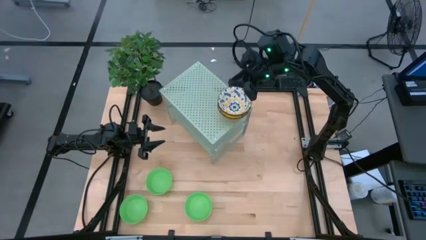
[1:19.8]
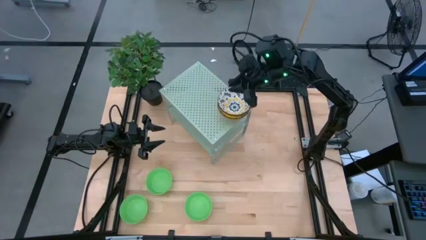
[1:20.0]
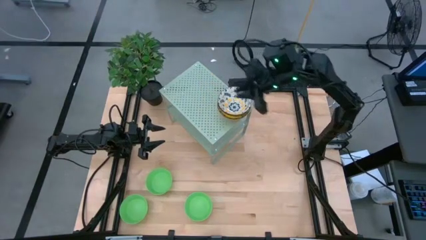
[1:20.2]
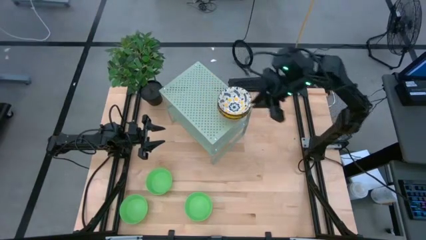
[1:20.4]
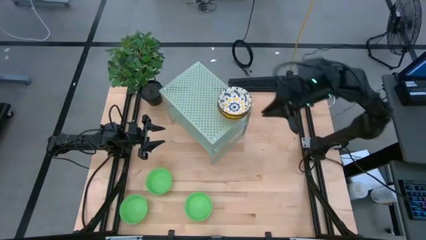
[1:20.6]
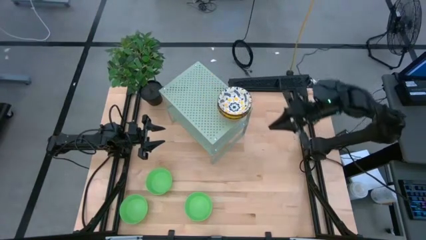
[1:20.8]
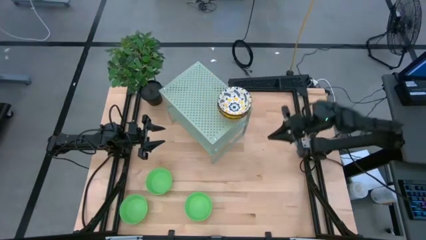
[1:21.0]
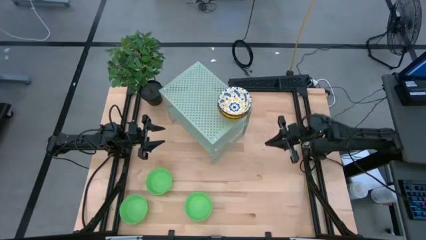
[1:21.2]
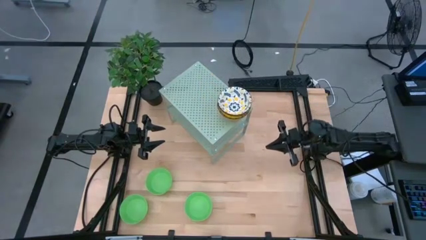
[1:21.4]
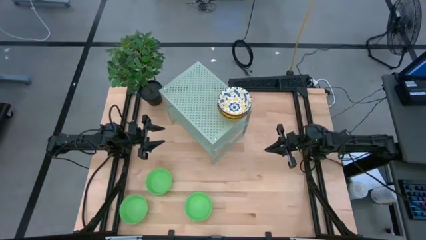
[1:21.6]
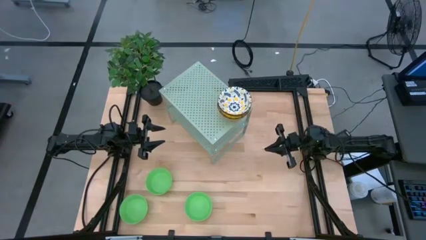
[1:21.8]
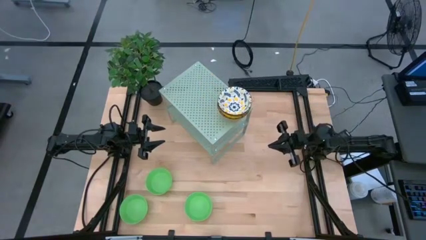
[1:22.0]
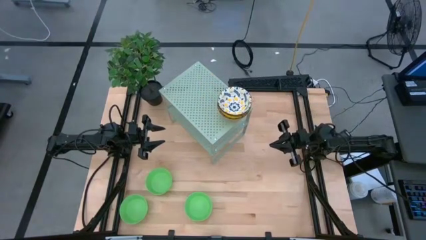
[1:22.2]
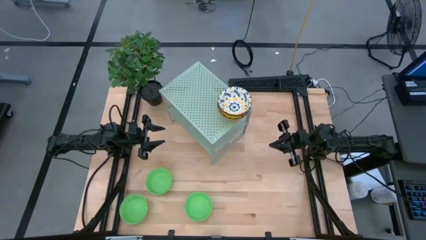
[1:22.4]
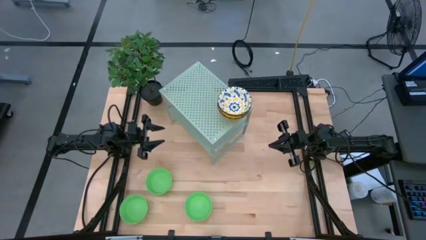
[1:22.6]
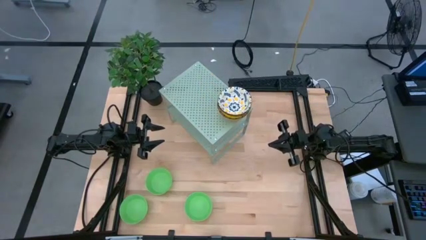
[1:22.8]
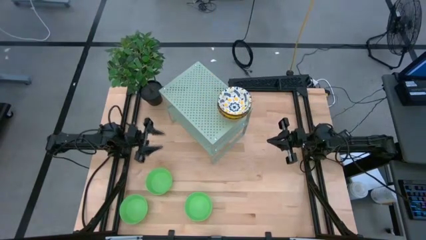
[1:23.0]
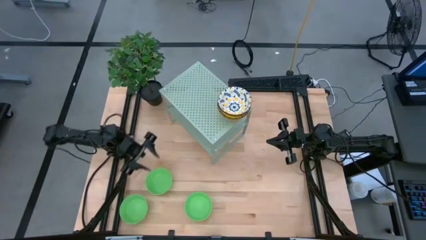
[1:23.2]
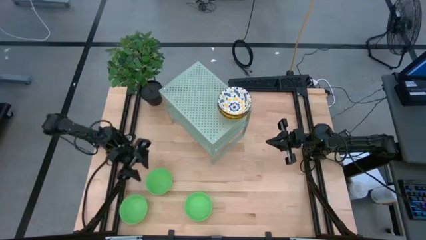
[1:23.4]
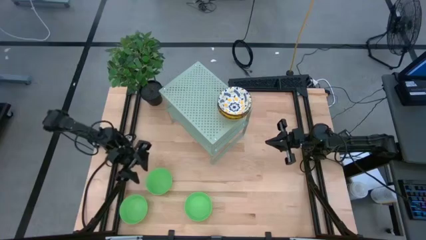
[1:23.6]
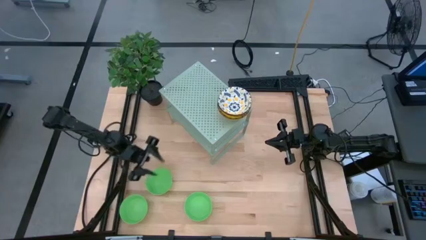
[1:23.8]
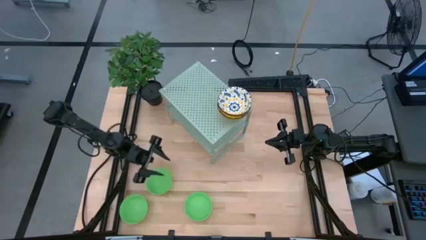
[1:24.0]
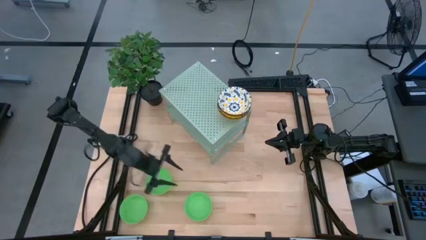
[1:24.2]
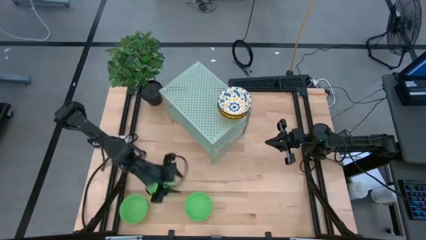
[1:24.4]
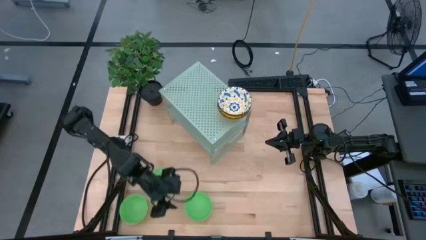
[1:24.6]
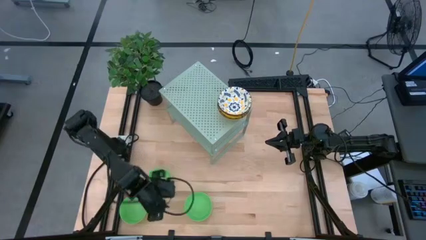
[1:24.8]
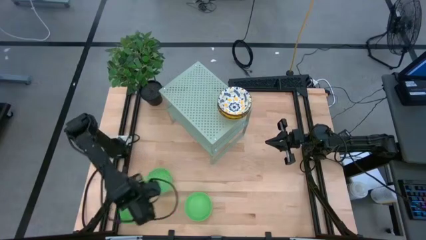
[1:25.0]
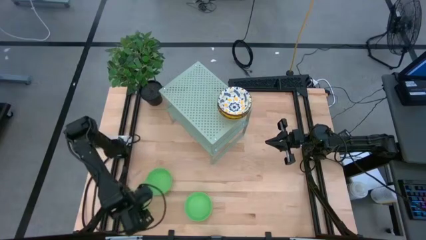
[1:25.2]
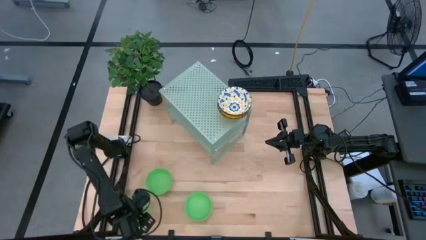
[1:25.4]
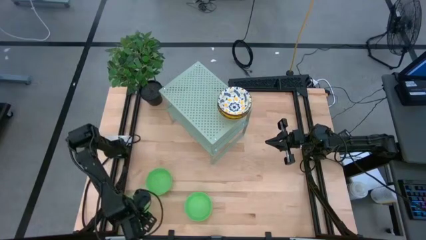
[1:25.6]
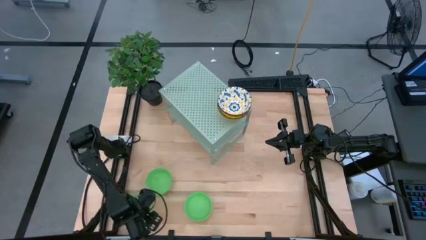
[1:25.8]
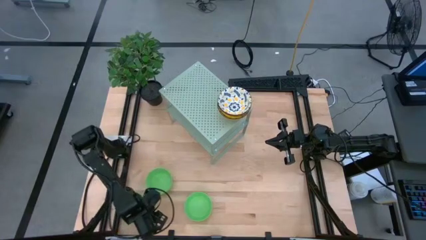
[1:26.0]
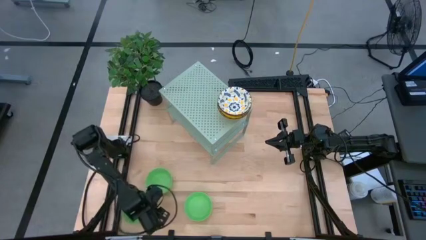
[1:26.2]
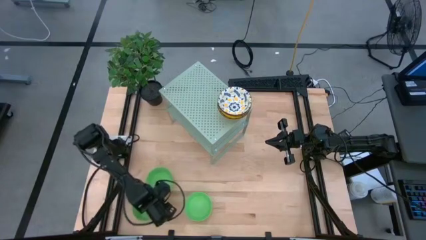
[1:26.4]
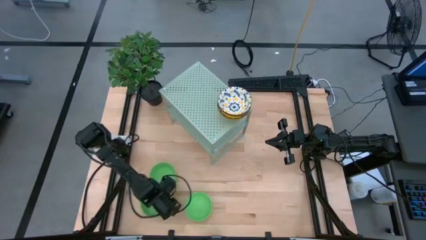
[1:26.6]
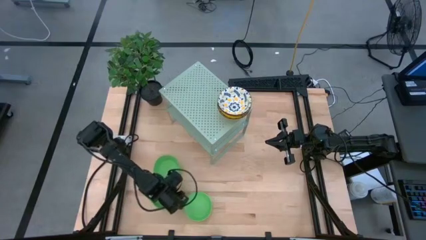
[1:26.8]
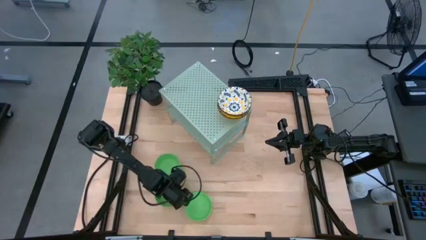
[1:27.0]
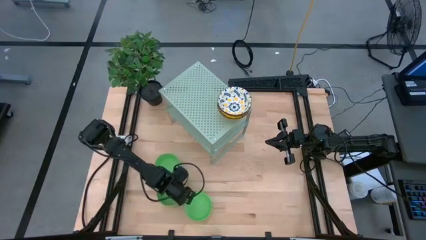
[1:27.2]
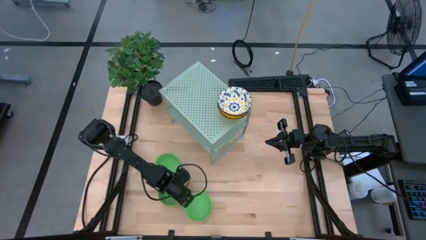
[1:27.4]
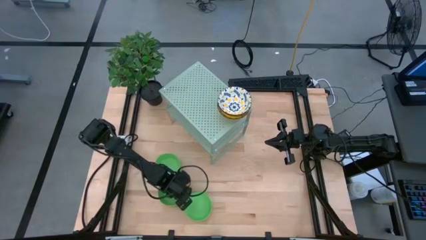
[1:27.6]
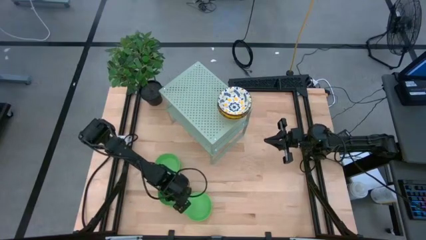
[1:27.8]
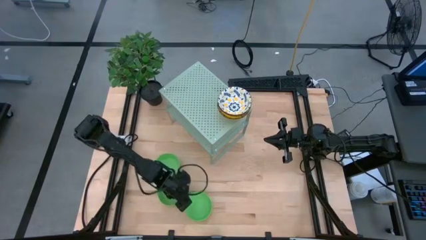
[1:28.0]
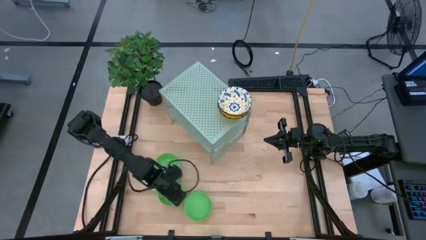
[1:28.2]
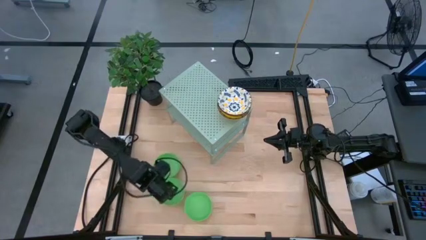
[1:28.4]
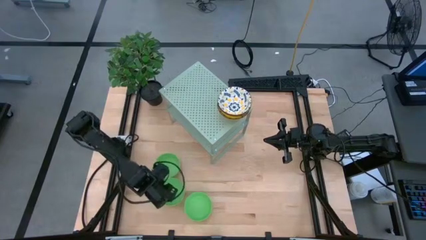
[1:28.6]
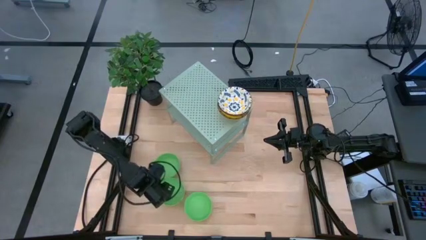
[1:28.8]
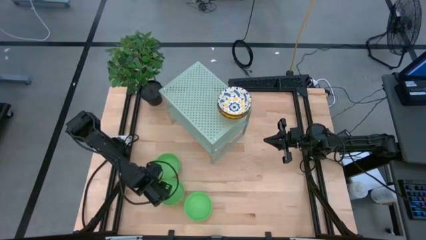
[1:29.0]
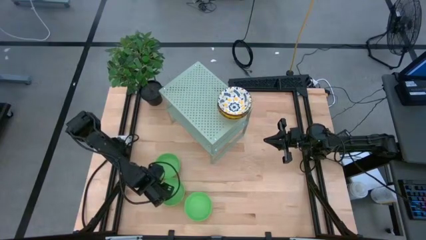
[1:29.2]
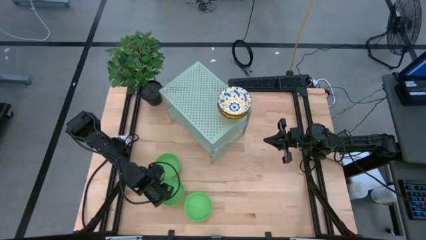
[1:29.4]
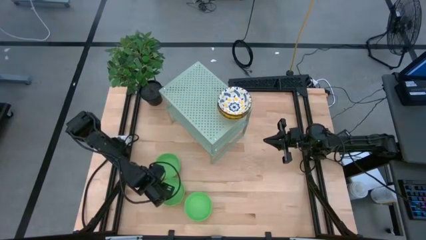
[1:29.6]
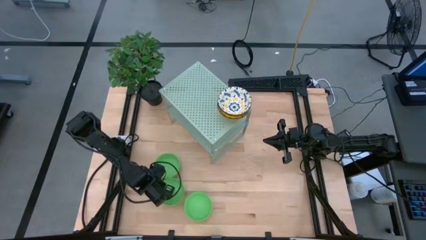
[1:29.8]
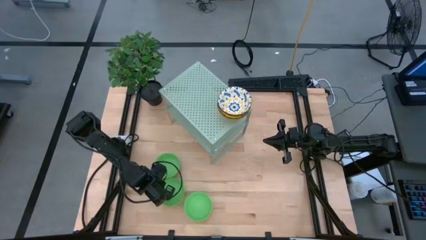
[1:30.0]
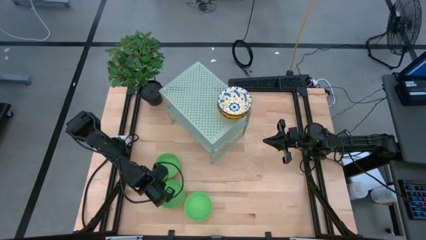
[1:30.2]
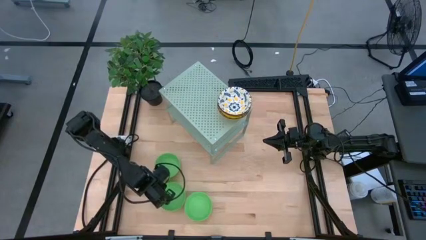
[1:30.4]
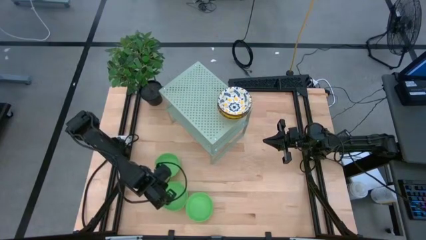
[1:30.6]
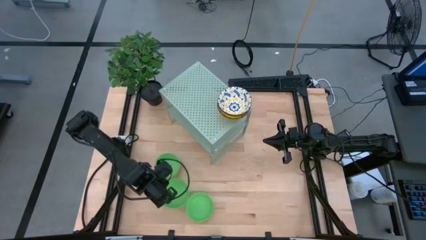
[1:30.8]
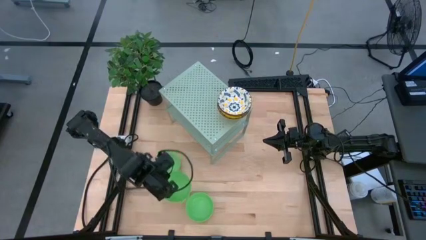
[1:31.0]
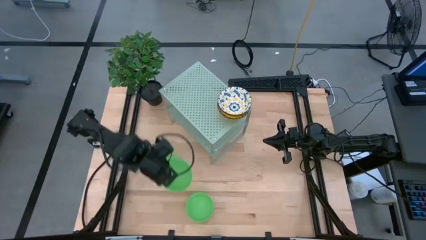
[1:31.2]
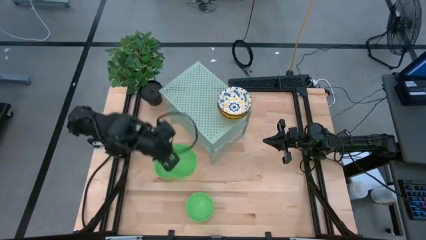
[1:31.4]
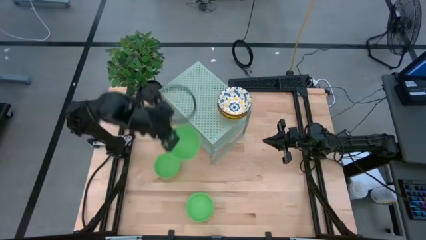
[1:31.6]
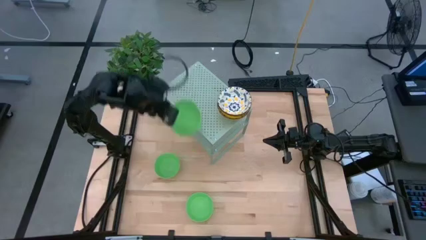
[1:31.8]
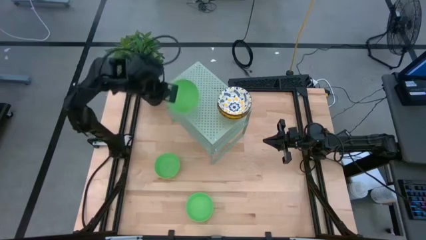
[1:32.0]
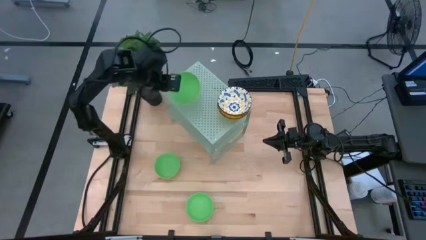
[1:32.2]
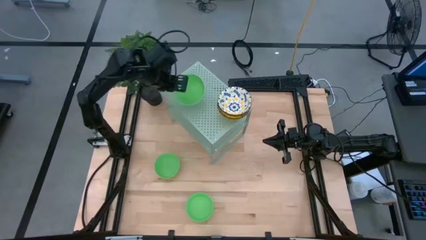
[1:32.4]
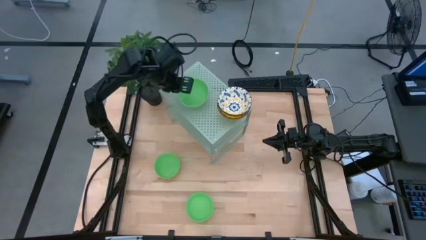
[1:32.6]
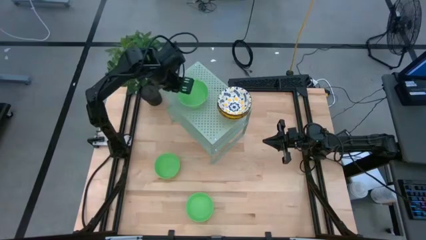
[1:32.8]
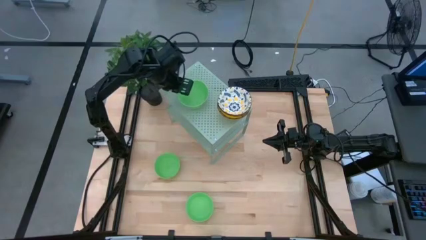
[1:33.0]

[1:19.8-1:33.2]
Task: Pick & Place Mini bowls
Put the bottom left green bowl on the shelf

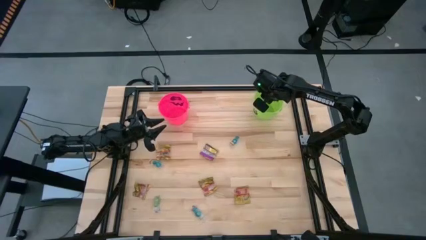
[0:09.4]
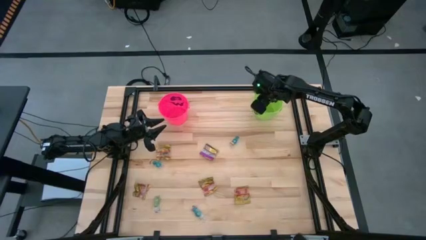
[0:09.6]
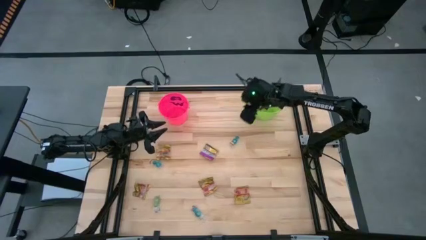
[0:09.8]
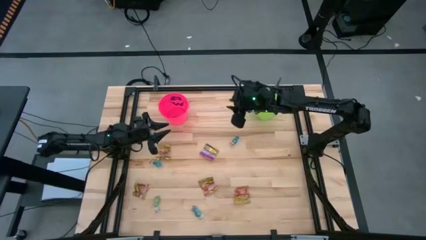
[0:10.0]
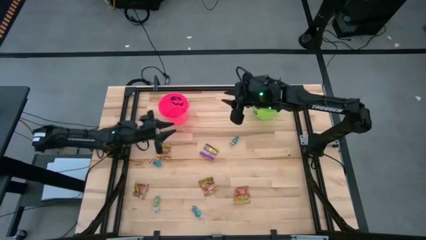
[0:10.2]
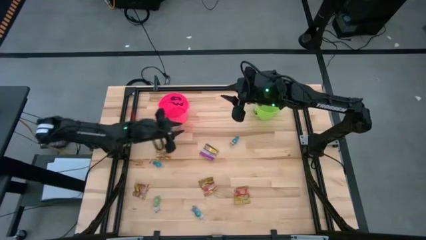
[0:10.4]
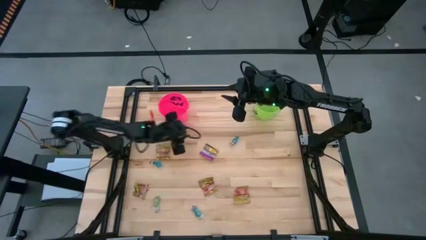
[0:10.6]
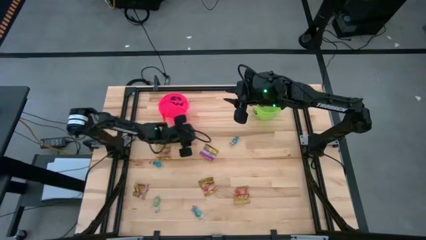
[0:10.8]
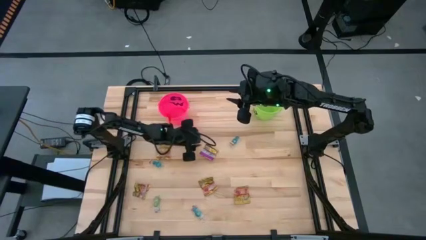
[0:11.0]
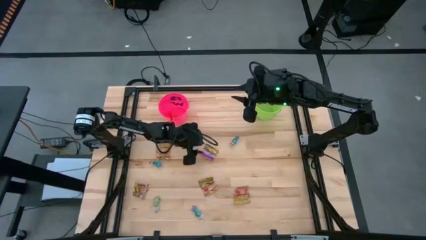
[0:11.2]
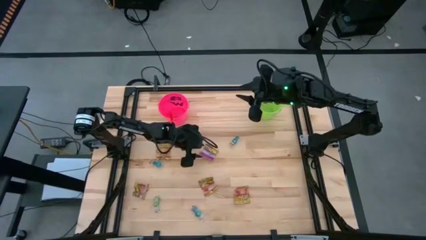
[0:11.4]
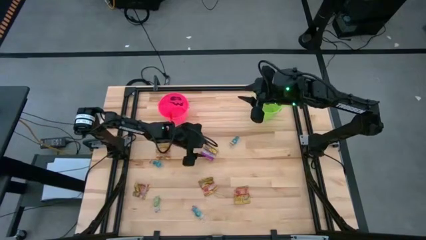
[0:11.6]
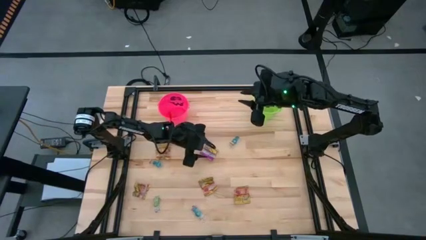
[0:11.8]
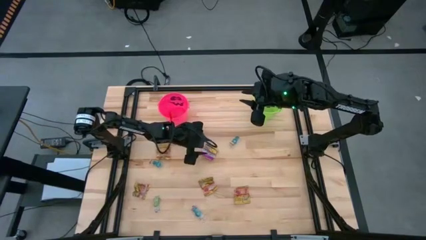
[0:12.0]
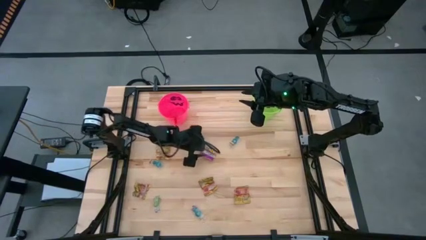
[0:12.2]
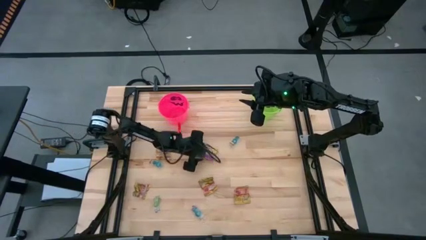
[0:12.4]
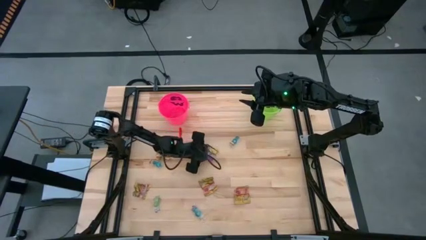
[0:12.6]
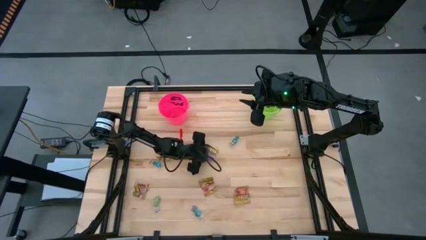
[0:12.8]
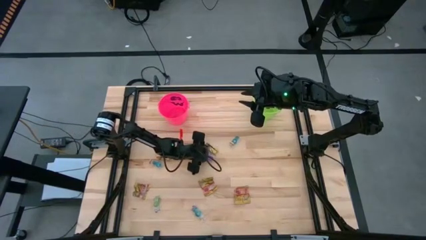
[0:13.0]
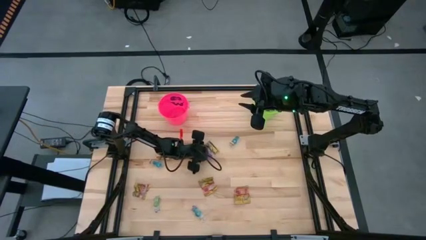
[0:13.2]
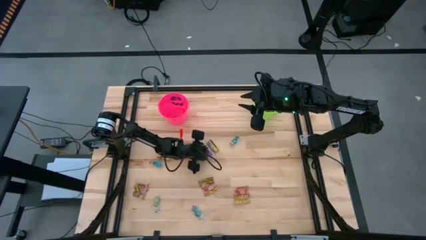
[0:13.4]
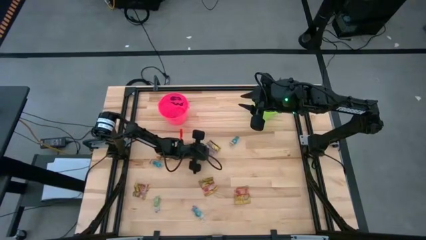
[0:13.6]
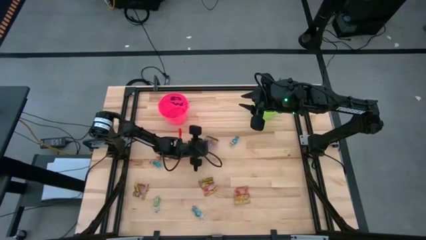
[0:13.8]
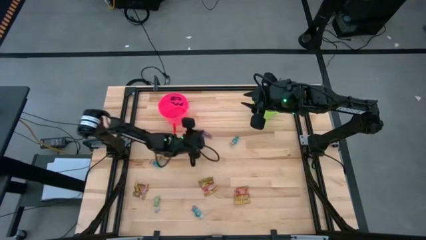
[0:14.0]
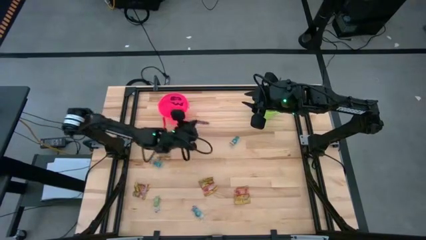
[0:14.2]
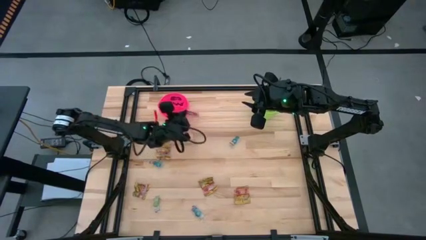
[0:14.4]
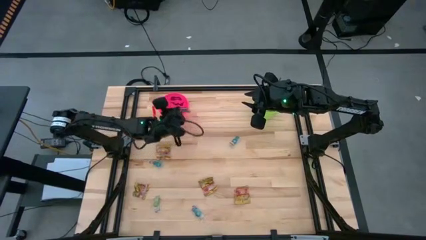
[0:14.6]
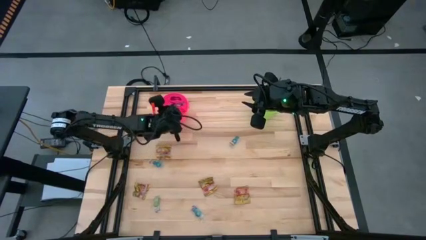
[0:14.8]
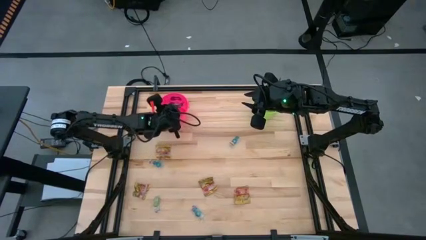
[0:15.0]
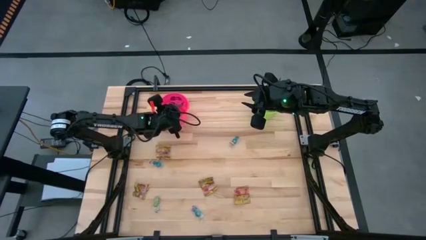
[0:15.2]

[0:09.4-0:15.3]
Task: Sort candy by brand, put in halloween buckets
Put the gold purple candy into the pink bucket
